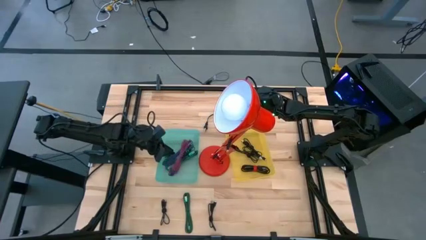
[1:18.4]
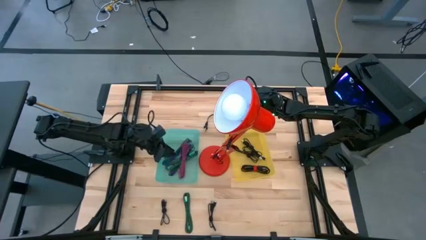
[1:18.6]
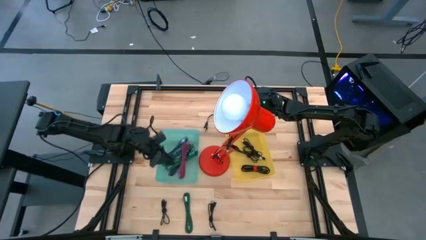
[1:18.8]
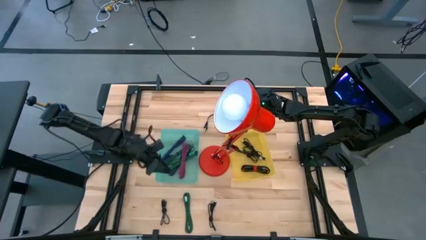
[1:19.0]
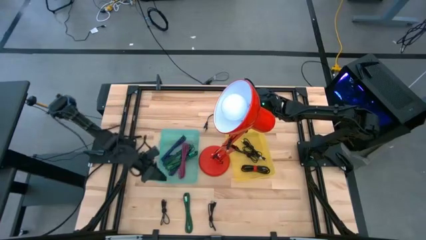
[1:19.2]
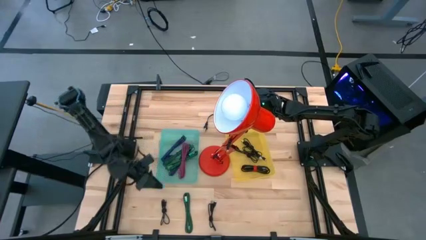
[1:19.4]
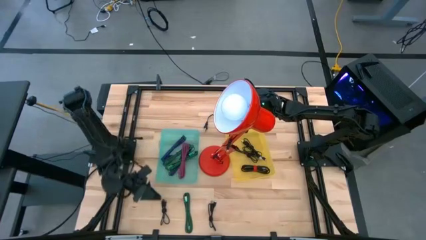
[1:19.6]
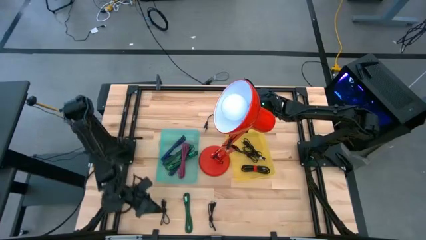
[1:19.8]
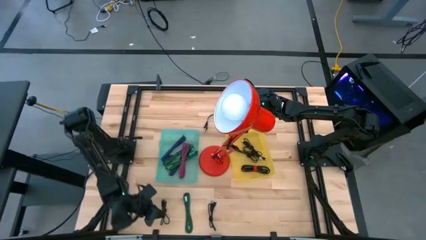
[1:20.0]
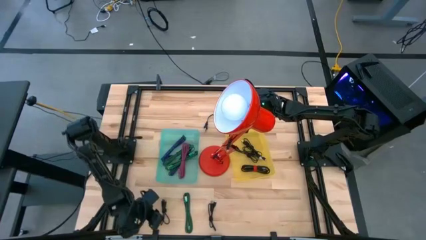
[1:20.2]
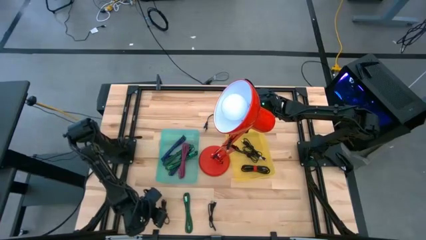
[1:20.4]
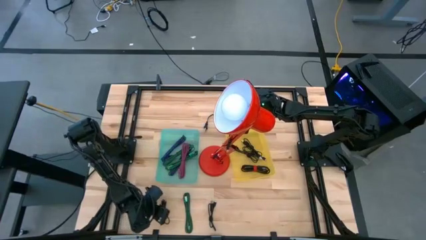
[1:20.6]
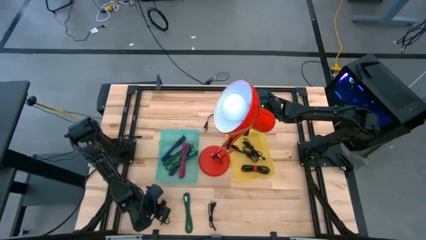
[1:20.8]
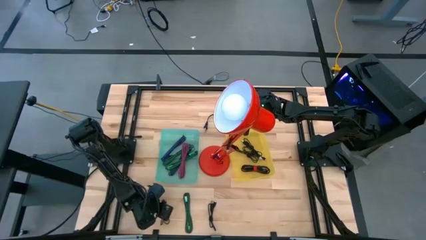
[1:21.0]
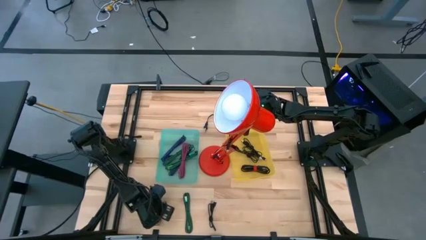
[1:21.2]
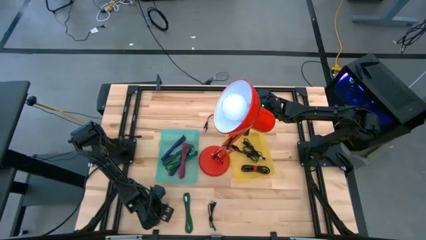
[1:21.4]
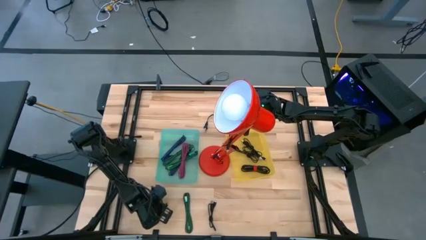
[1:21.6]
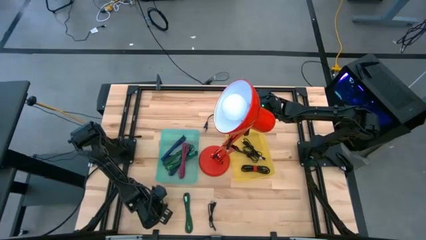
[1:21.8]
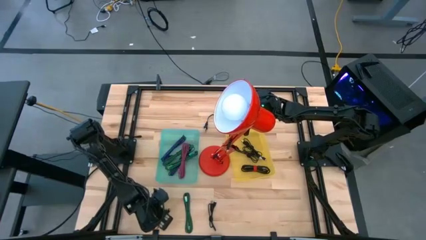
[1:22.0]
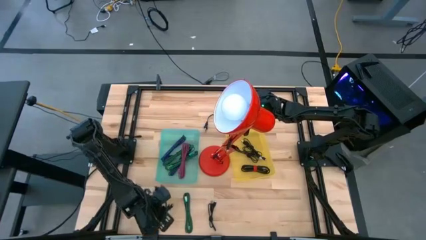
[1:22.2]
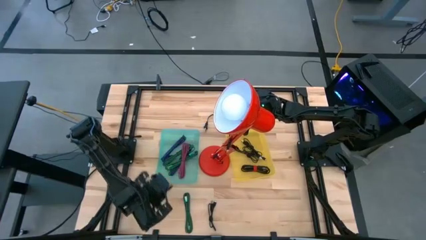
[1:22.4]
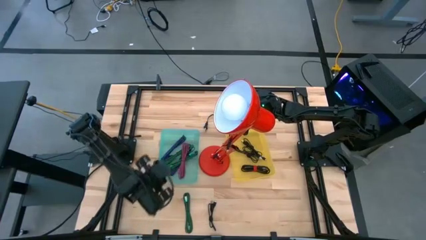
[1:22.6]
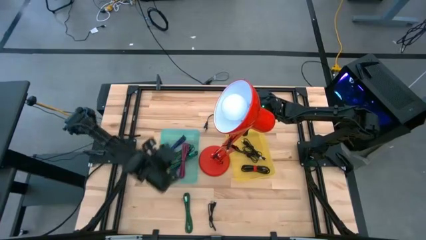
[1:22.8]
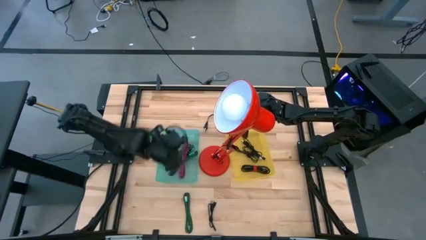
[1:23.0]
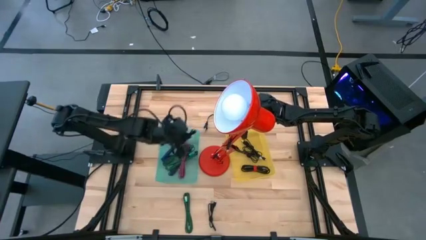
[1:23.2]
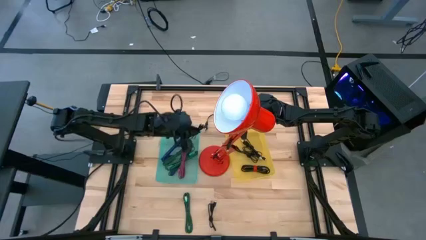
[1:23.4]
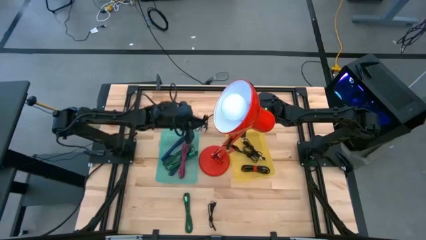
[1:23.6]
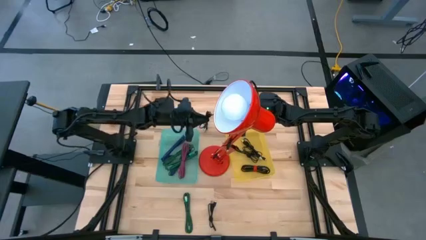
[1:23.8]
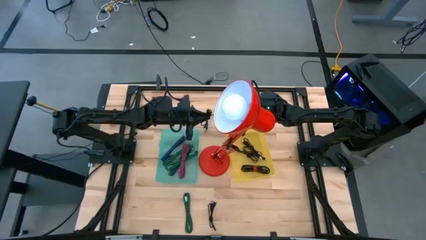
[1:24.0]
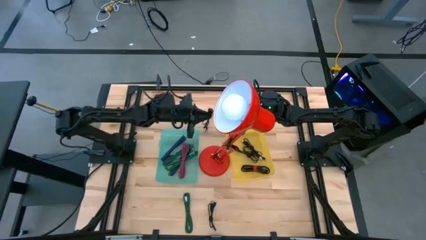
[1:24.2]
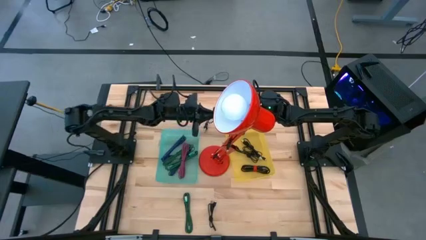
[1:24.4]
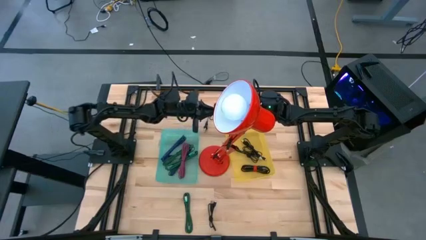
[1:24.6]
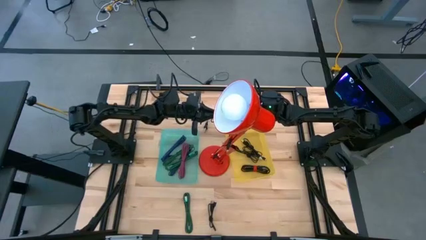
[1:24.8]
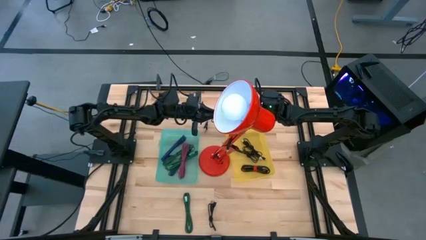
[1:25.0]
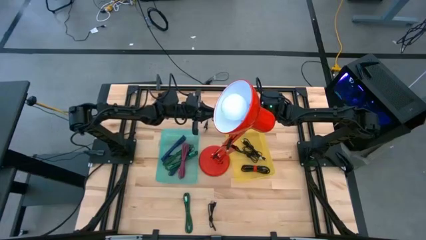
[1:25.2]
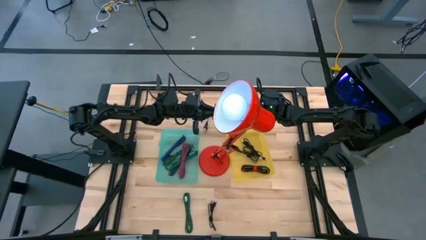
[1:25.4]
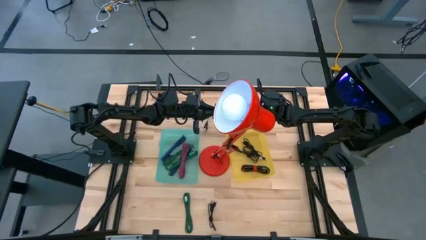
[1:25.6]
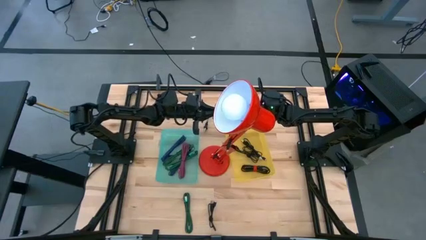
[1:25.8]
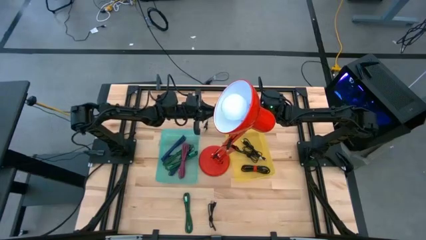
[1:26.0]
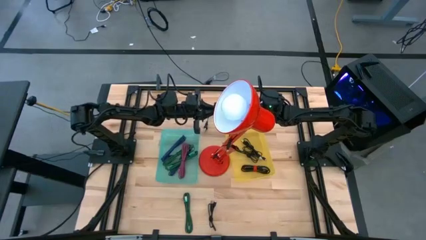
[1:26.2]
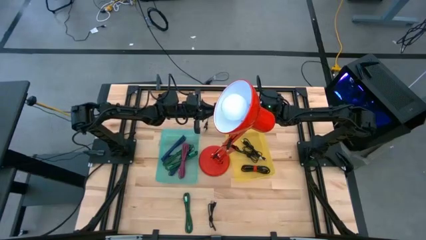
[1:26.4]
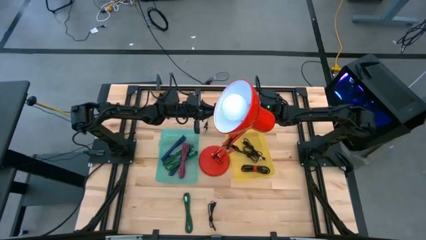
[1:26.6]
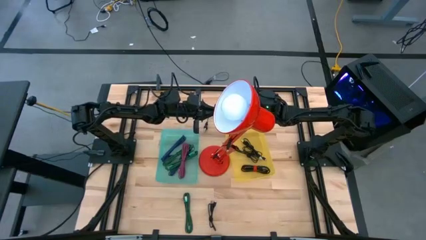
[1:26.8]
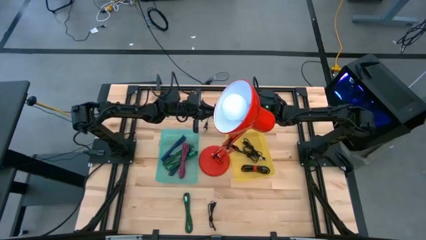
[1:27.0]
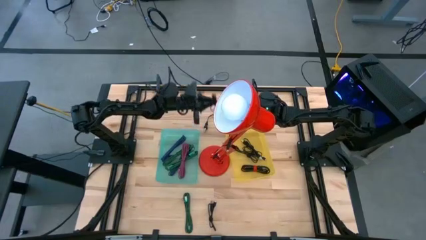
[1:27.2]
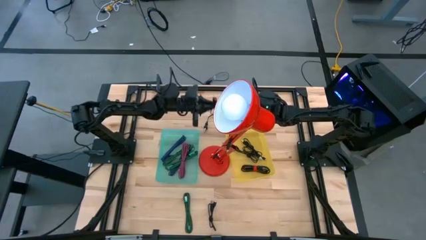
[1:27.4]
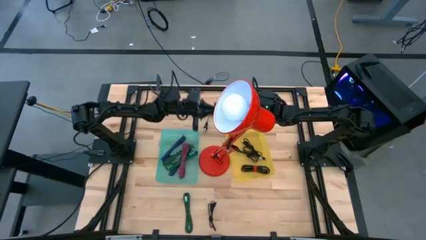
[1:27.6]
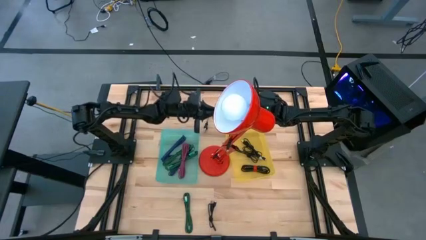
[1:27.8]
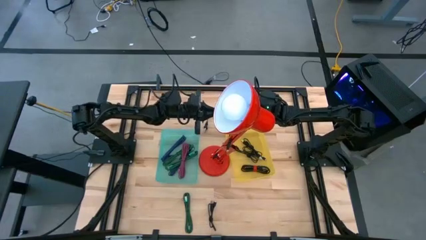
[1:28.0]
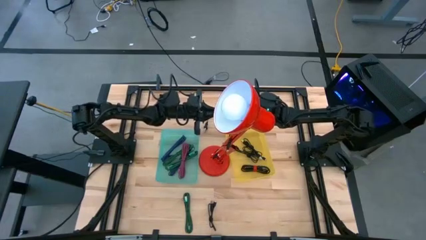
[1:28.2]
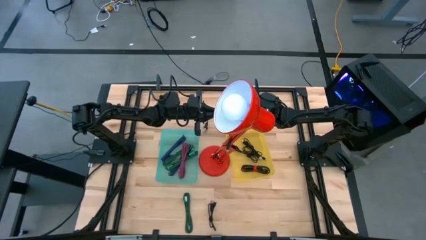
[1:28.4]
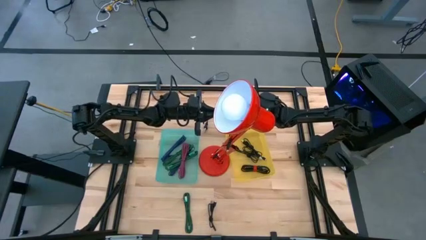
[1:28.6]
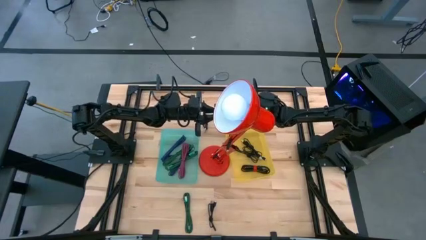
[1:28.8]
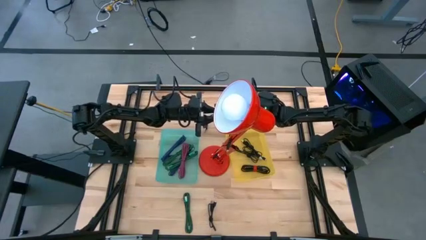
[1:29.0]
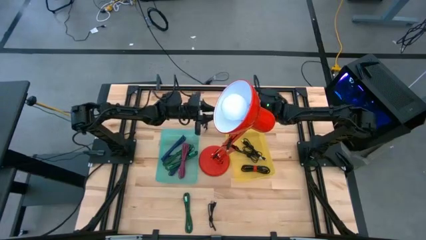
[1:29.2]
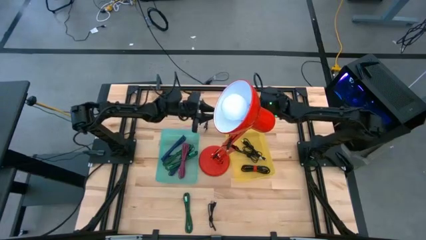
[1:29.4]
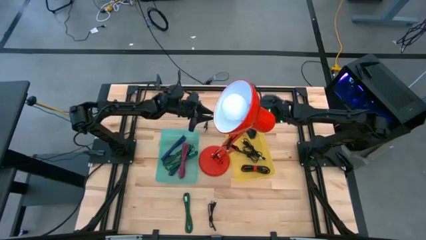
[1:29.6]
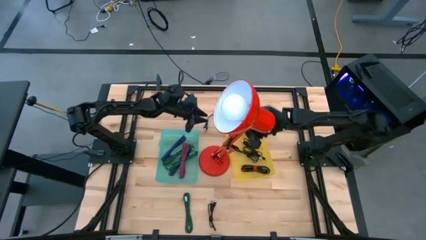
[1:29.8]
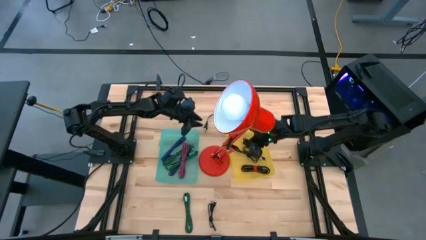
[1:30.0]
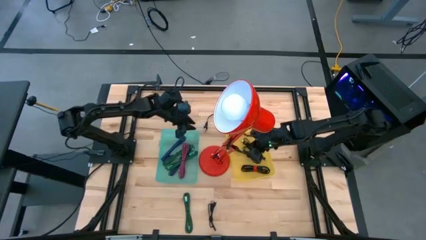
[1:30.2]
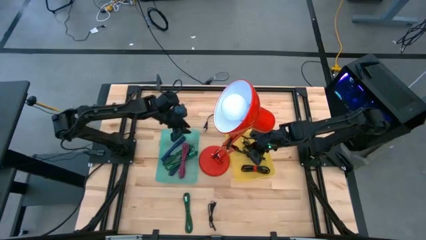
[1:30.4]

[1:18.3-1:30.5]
Task: Pick & Place USB Port
Put the black charger cable into the yellow bin

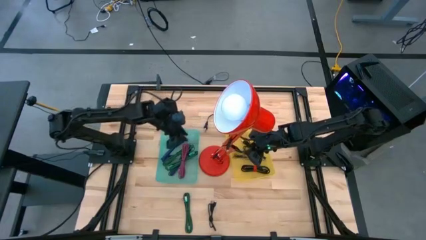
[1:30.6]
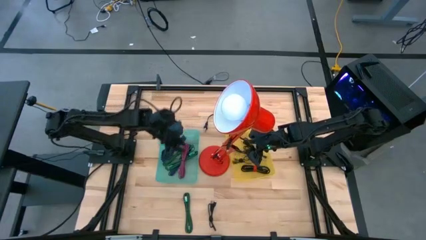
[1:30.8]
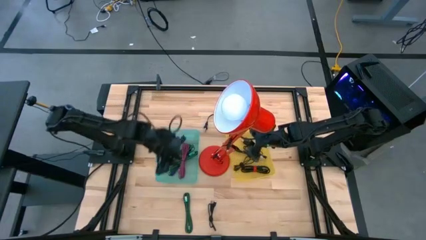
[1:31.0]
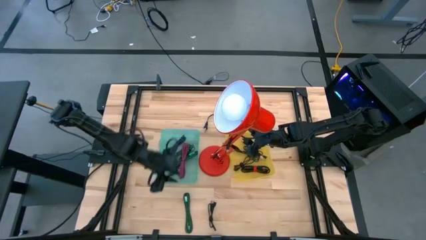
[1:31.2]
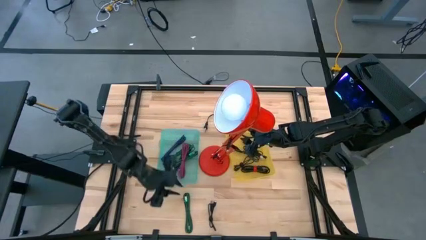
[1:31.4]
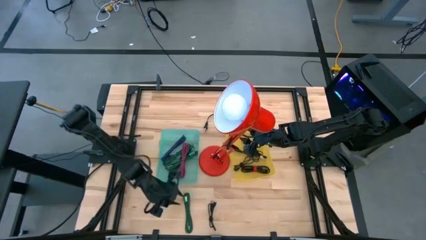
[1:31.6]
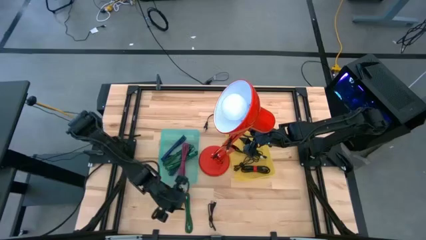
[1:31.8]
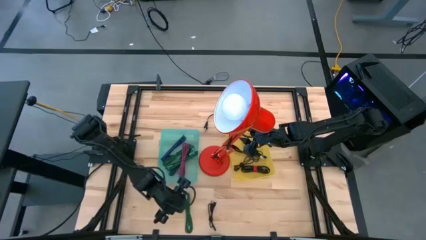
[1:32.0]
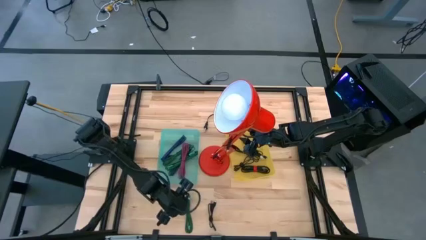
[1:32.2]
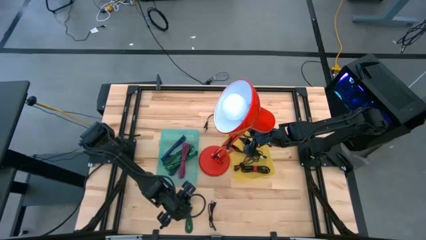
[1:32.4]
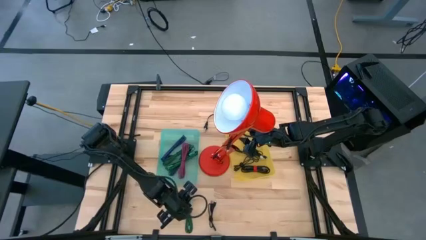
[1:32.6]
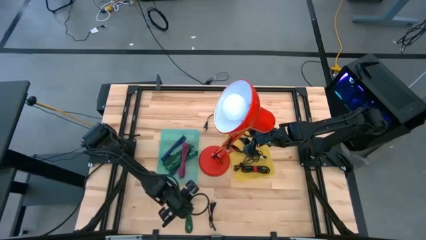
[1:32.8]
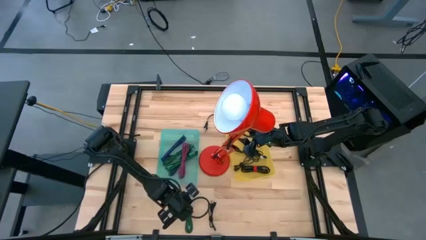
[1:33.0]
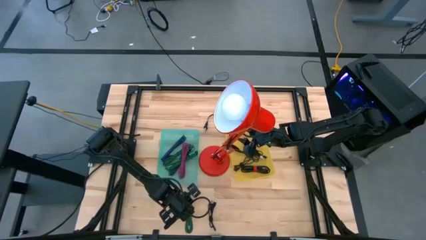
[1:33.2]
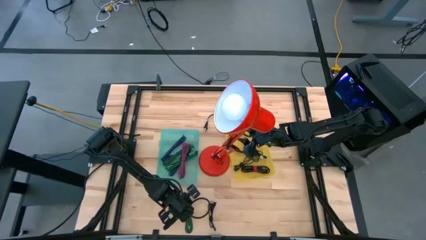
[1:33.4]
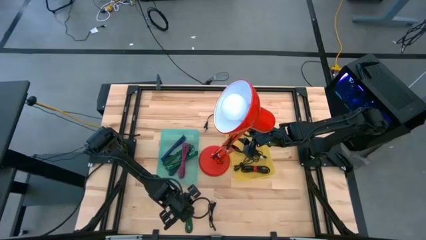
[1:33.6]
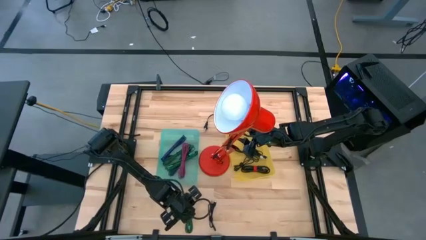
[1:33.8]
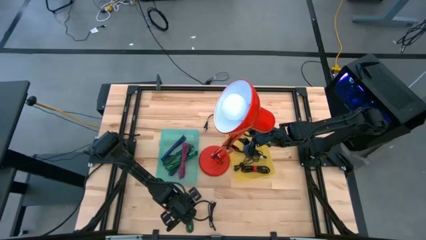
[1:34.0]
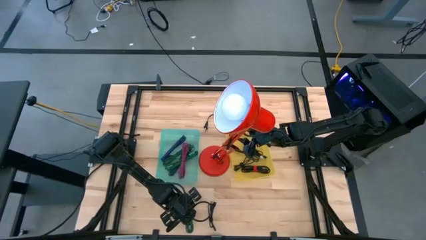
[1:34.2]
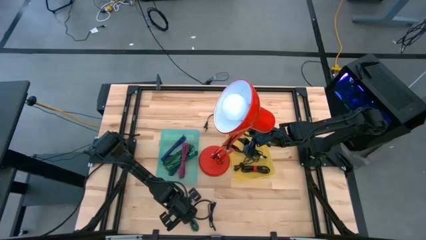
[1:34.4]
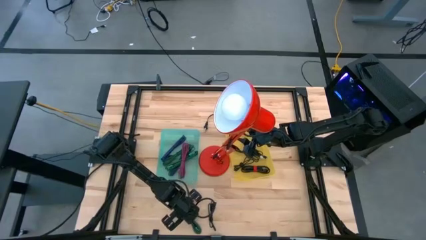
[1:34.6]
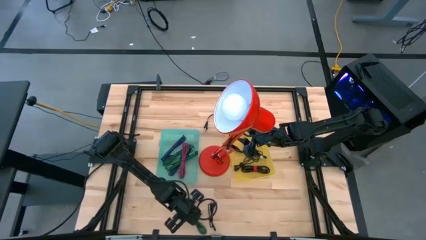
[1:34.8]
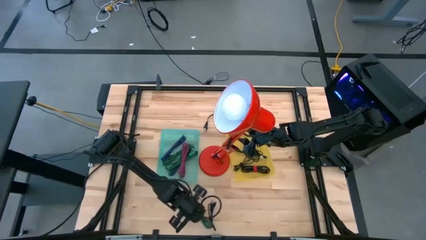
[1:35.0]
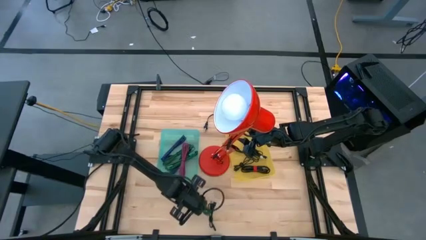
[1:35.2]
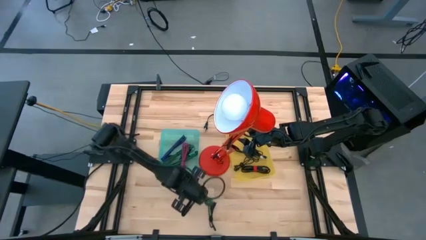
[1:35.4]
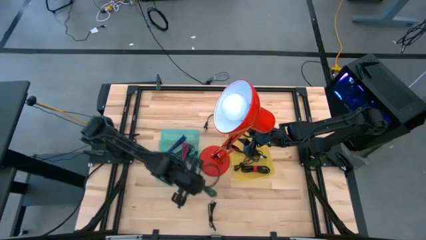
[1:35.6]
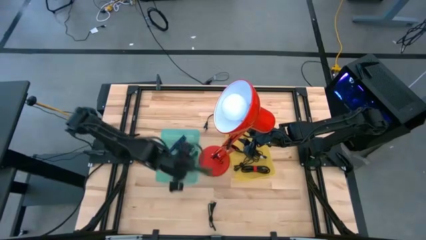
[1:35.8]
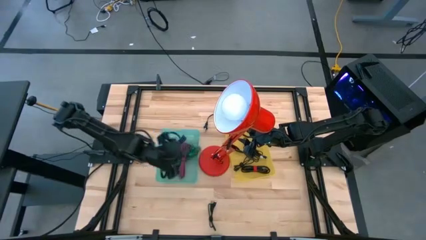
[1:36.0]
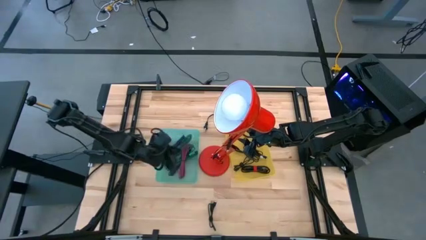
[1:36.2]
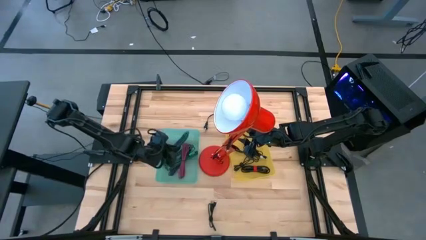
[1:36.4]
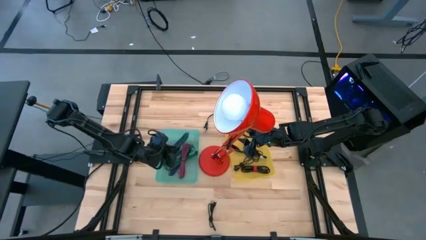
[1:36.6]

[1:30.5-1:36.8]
Put the green patterned charger cable into the blue bin
